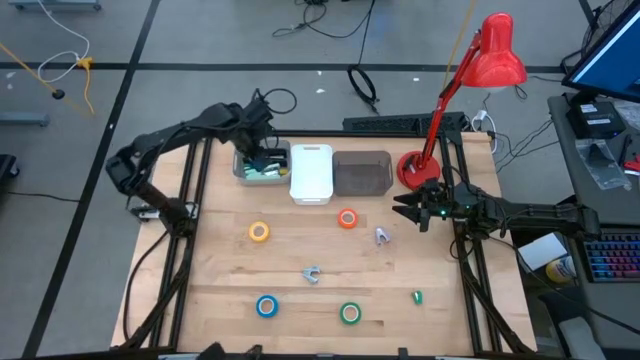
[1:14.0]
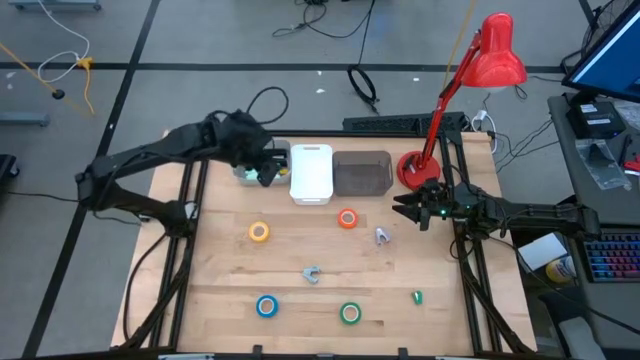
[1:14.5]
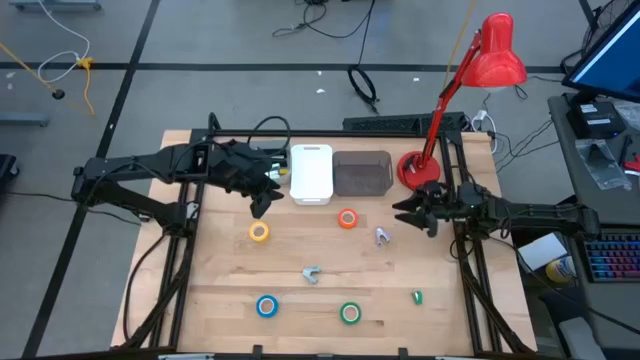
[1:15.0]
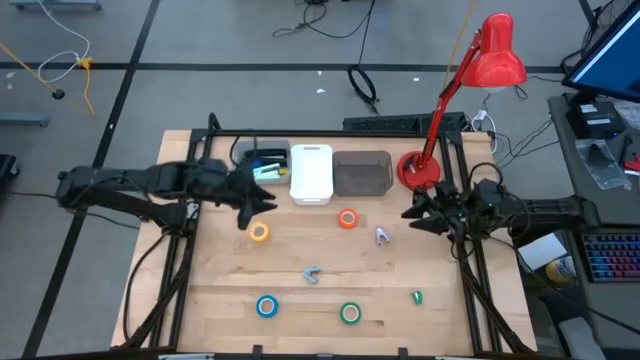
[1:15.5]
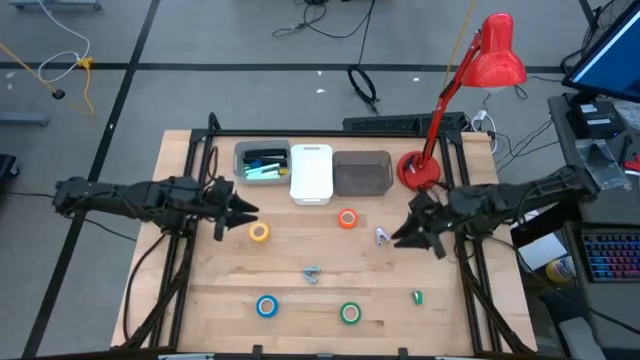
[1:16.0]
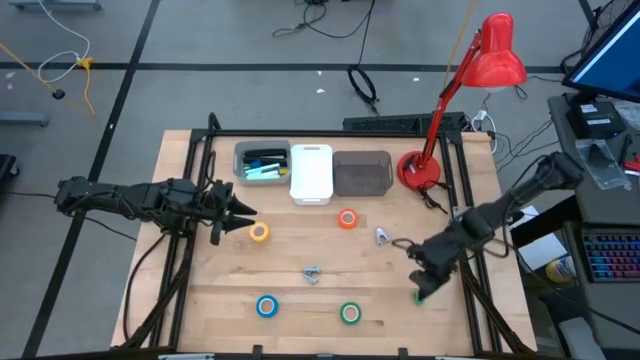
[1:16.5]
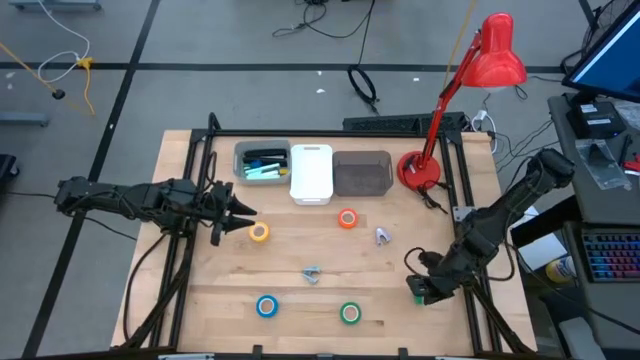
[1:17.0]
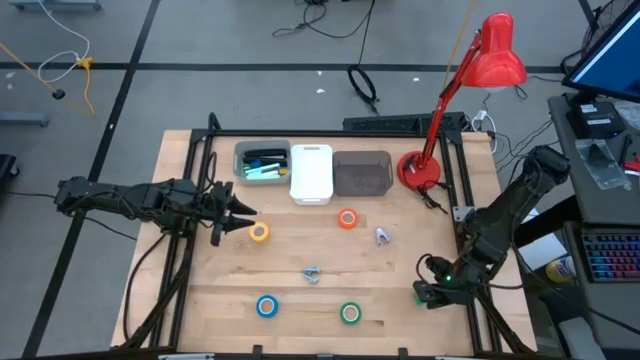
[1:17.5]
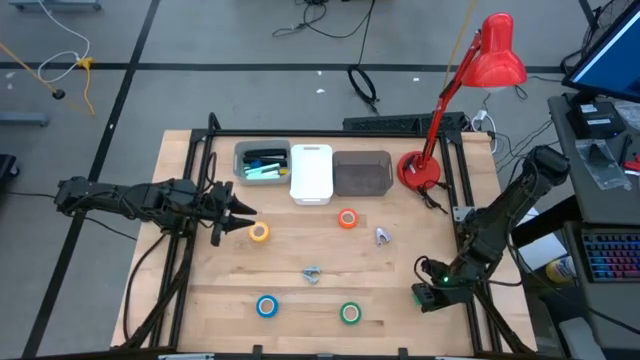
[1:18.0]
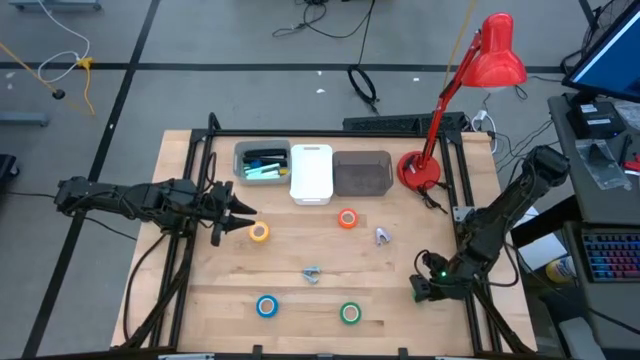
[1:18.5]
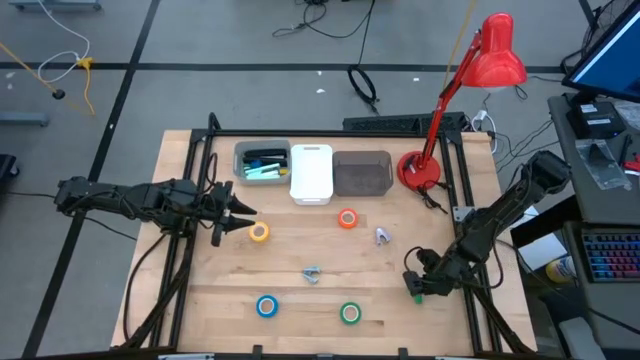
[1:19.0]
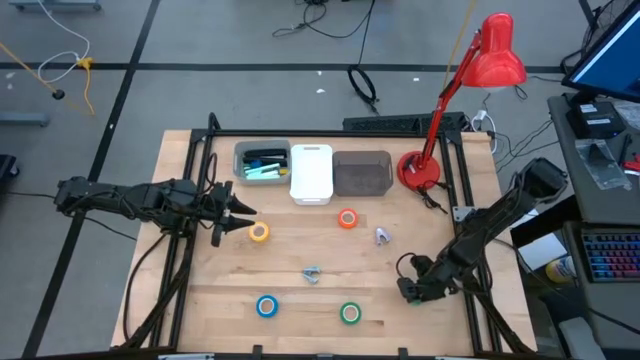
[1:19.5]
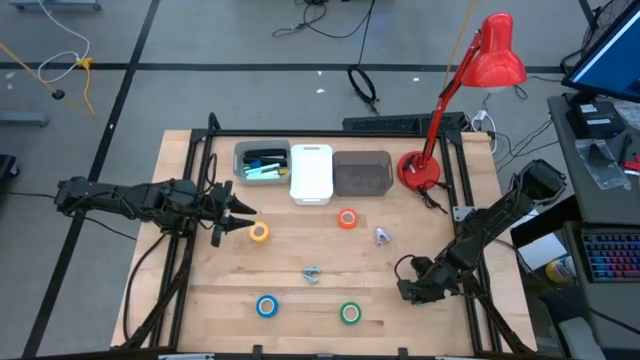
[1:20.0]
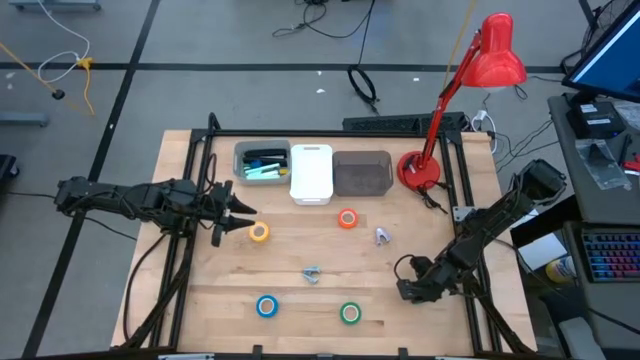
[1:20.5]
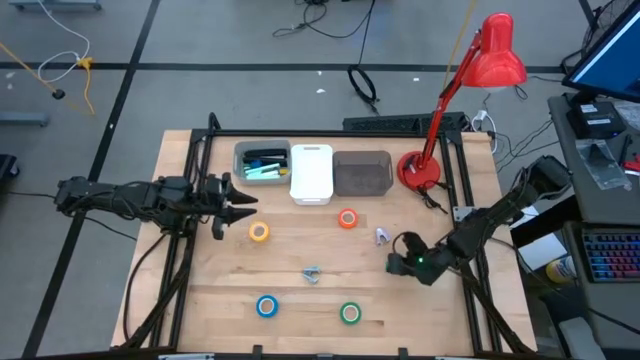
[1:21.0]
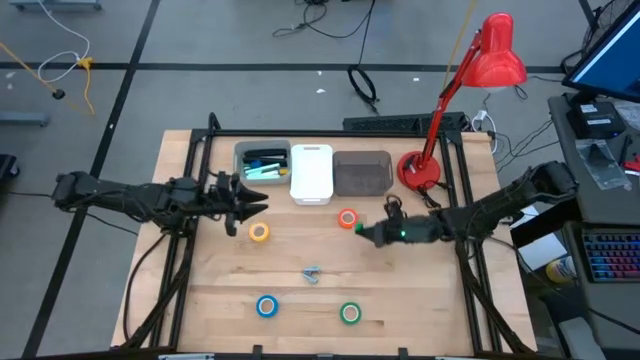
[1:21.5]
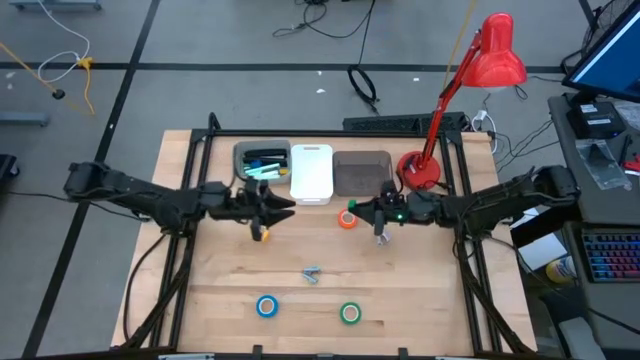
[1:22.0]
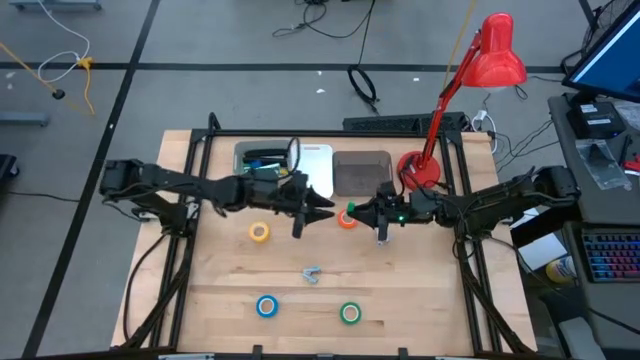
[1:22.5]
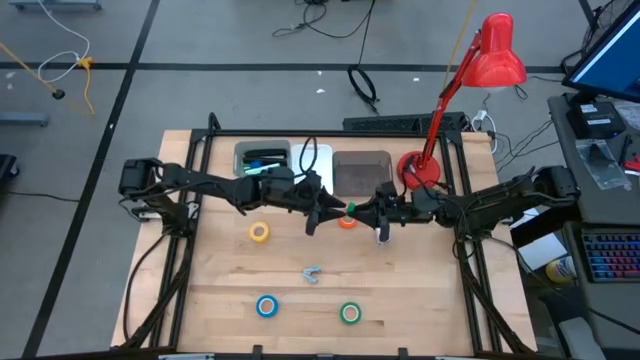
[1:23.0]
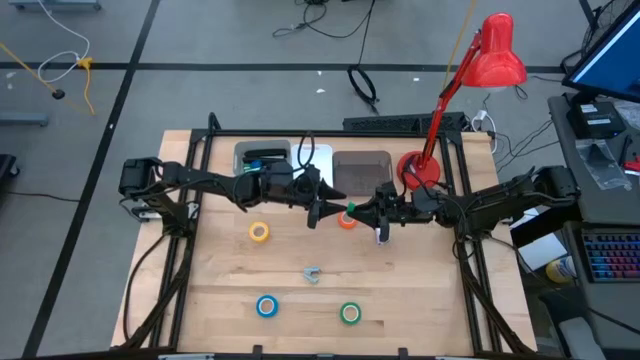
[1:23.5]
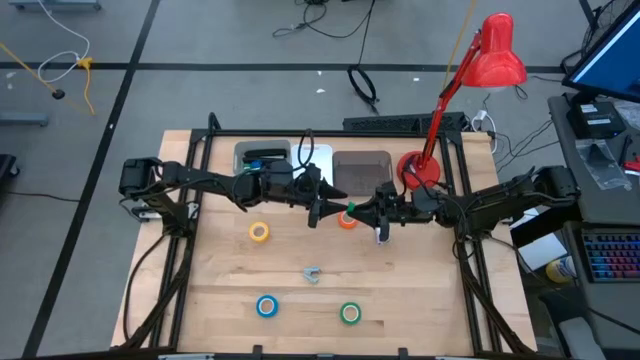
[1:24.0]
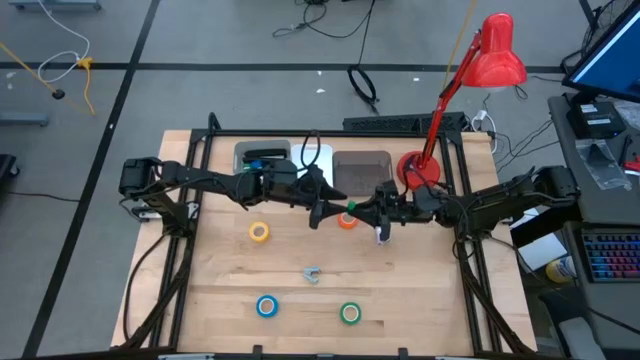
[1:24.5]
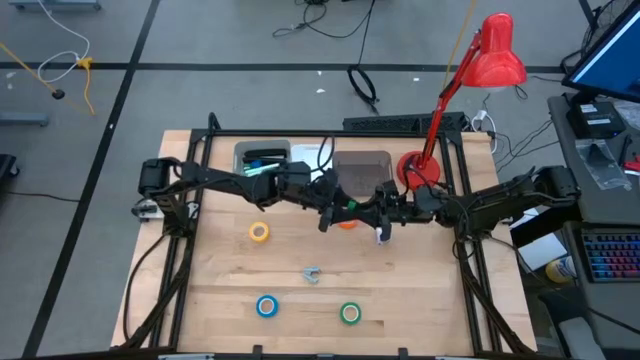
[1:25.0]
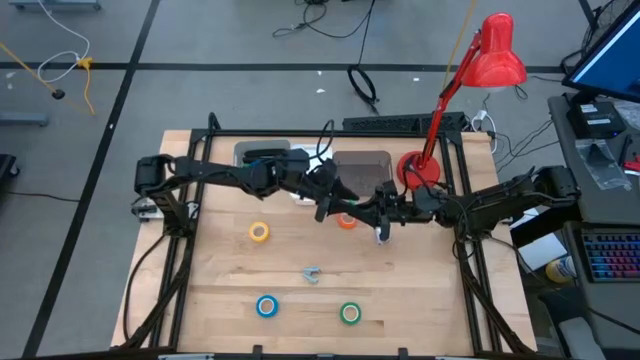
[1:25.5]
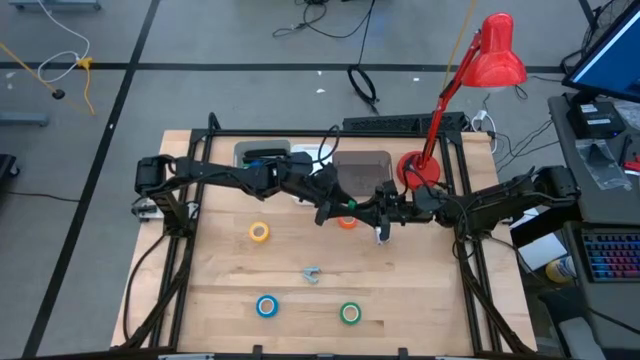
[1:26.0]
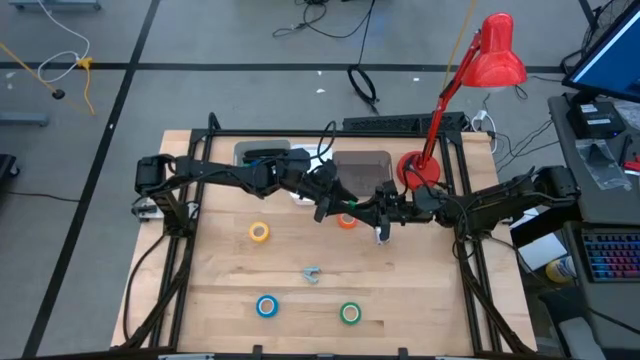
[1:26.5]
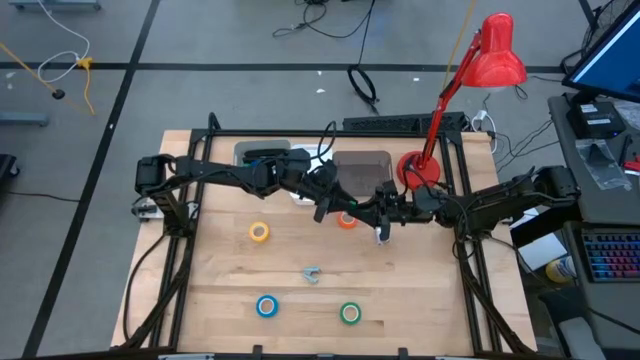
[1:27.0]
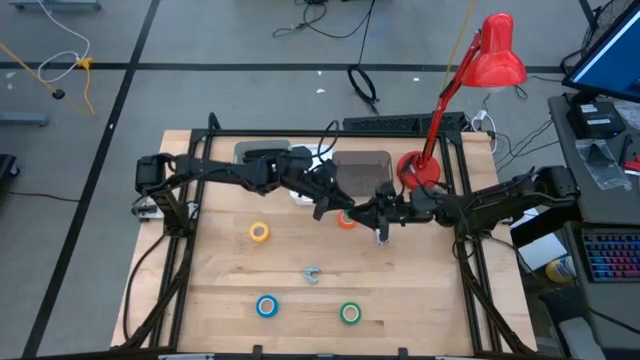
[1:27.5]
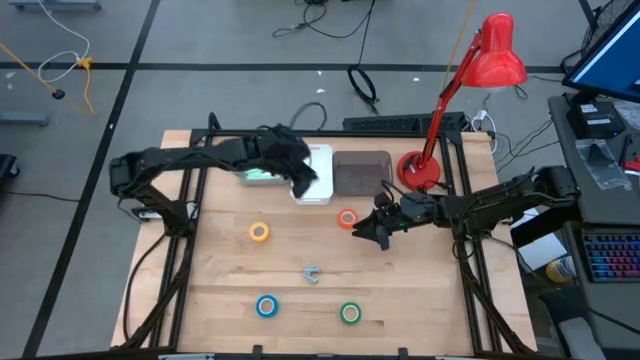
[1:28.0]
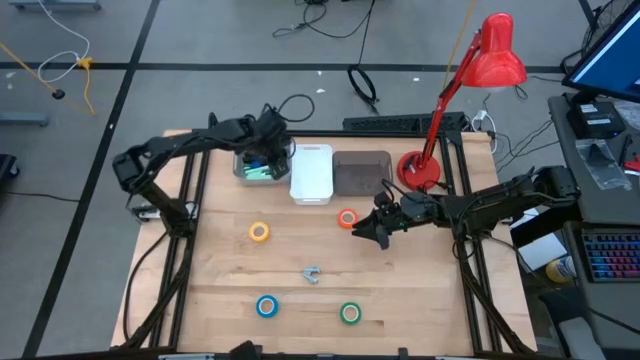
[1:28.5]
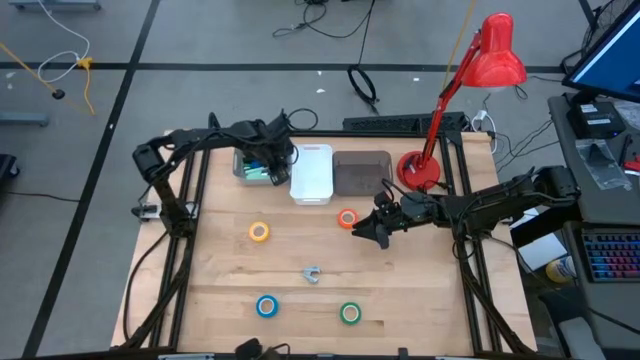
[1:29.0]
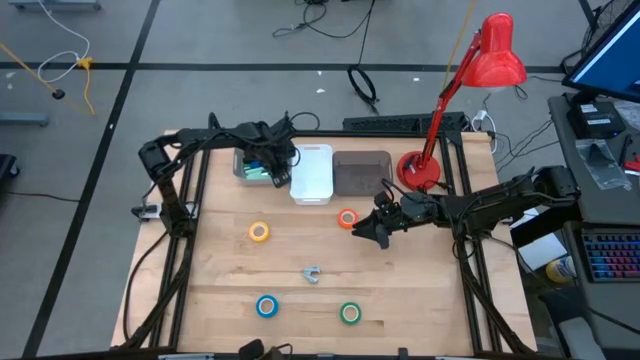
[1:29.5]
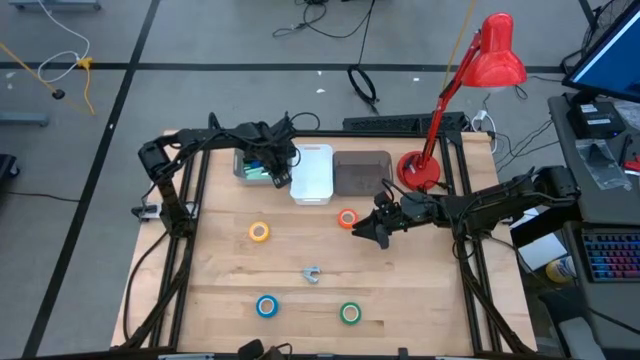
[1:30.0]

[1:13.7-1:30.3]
Task: Pick and place Stapler, Stapler remover, tape
Put the green stapler into the gray bin

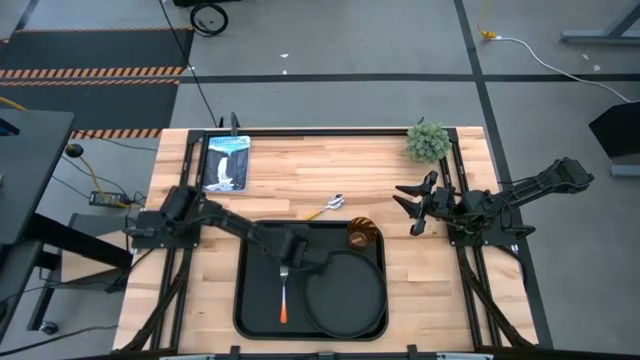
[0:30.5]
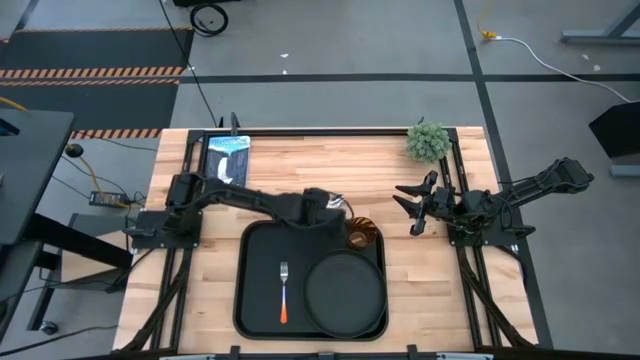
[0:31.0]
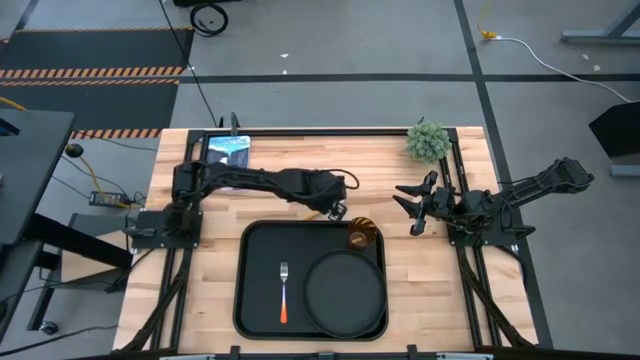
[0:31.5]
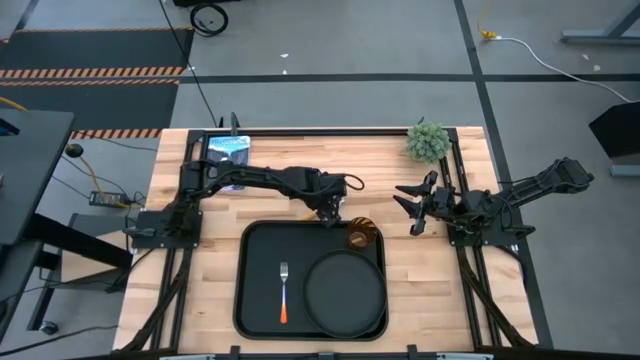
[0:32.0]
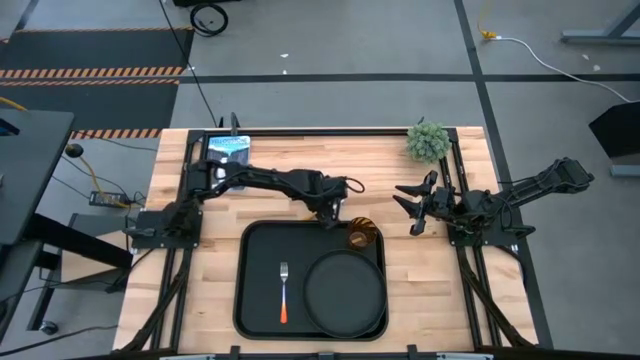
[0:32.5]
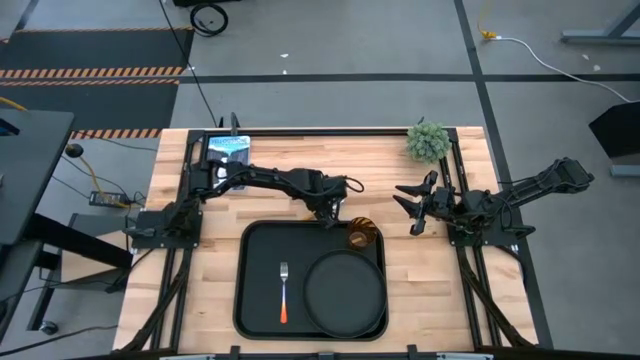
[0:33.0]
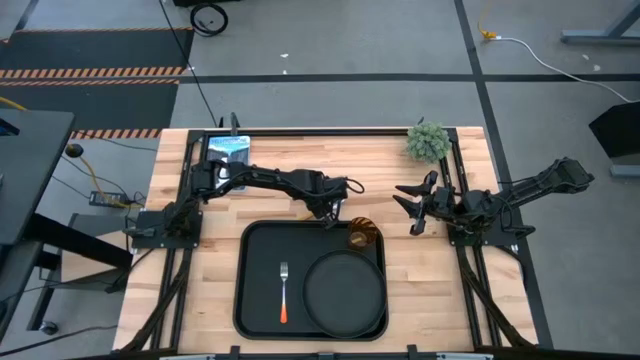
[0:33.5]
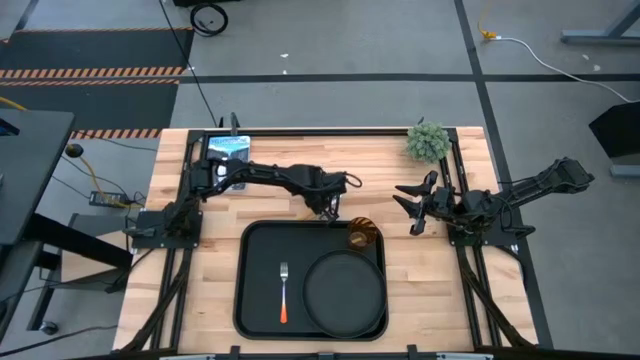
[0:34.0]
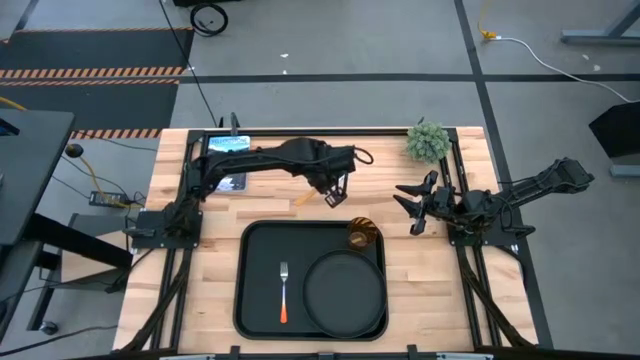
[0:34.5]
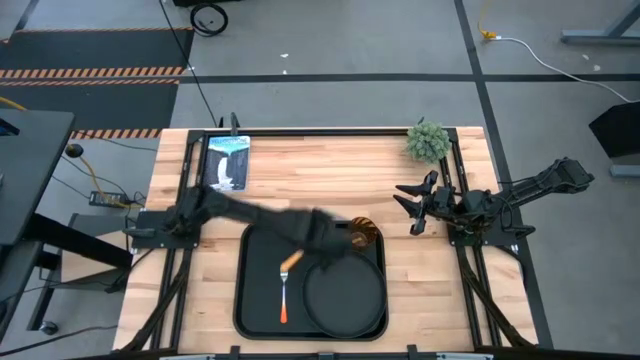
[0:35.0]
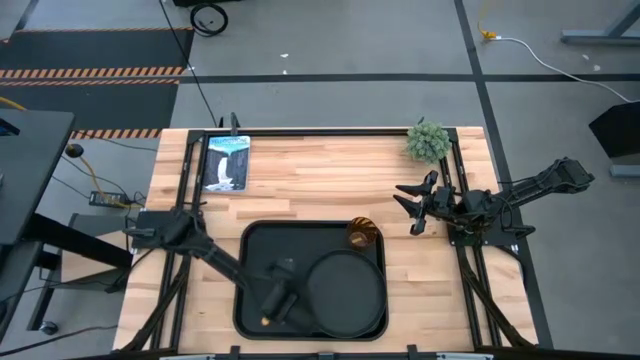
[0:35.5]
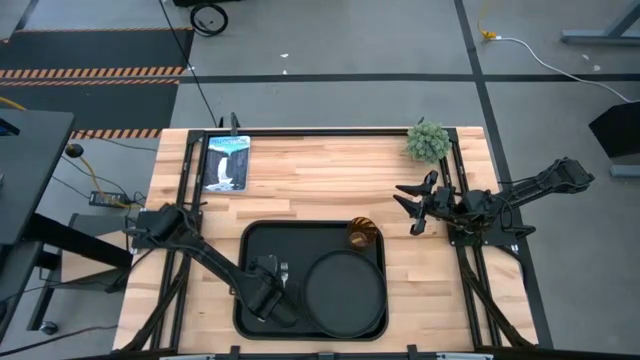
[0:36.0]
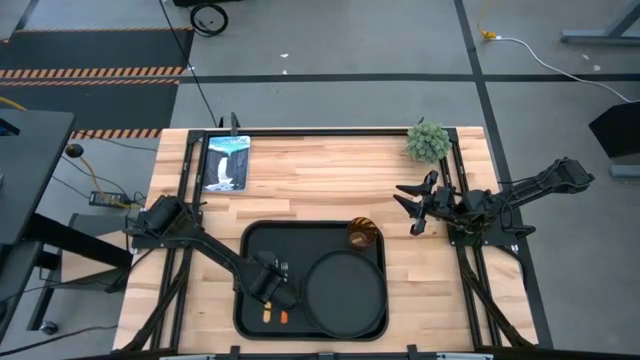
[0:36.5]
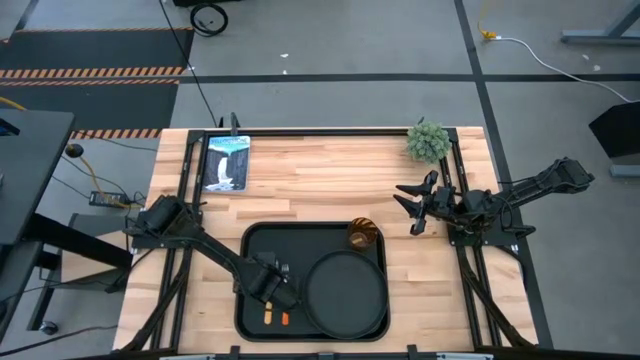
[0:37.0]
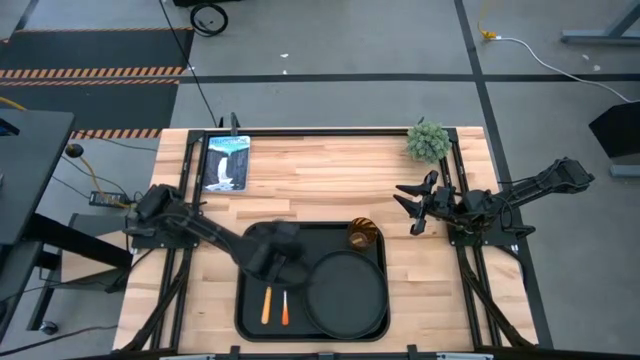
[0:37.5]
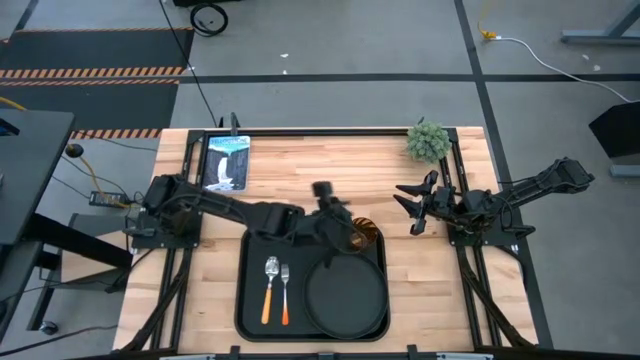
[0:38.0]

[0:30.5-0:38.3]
Task: Pick and place plate/cup/fork/spoon on tray
Put the yellow spoon on the black tray, on the left side of the orange fork
